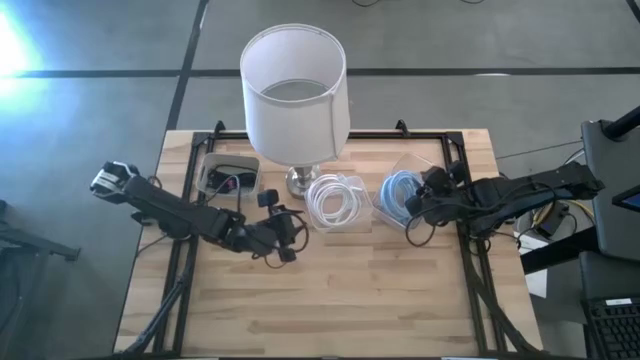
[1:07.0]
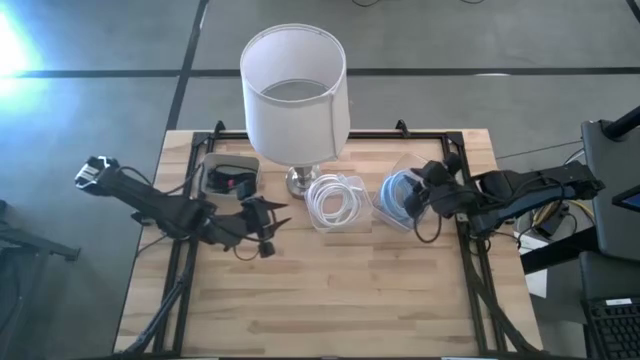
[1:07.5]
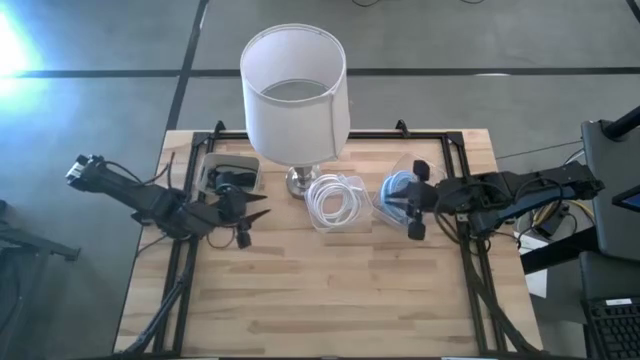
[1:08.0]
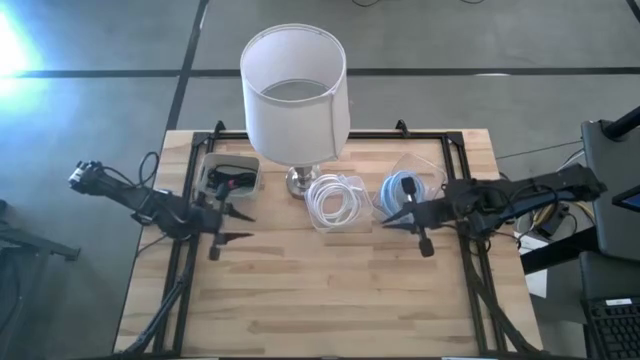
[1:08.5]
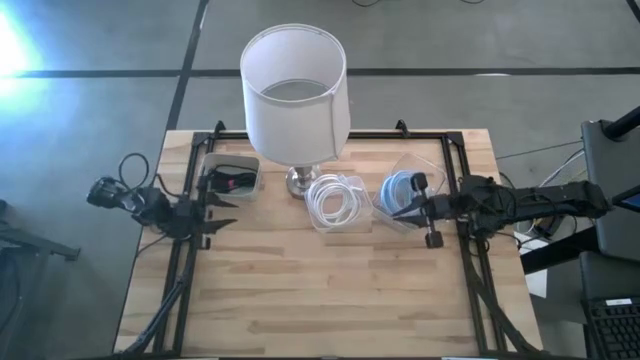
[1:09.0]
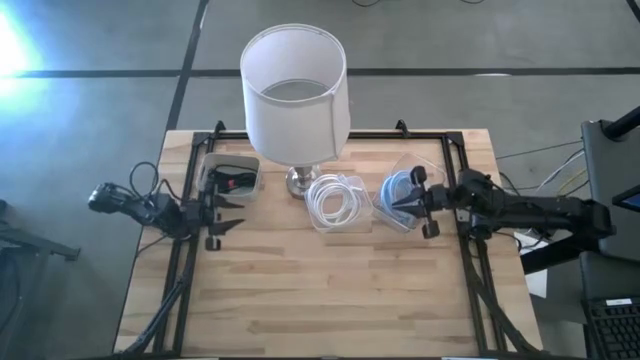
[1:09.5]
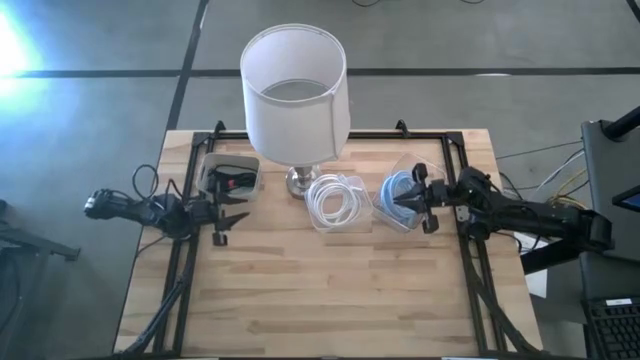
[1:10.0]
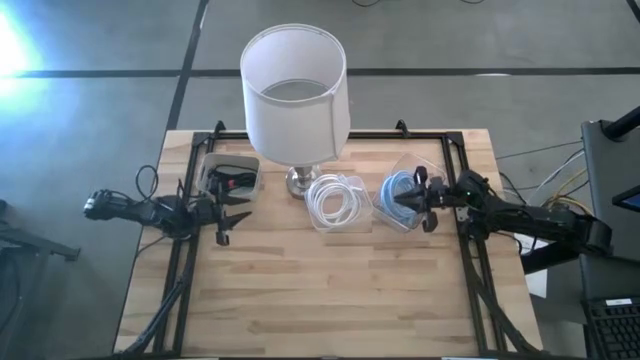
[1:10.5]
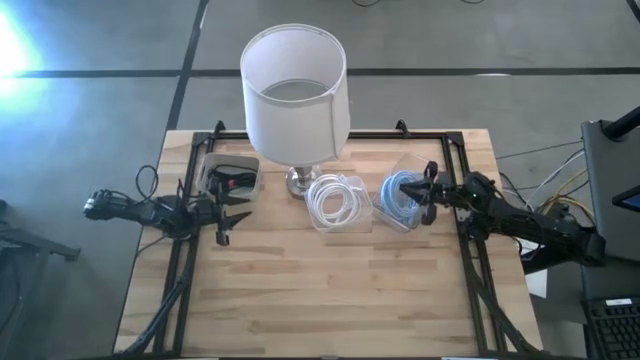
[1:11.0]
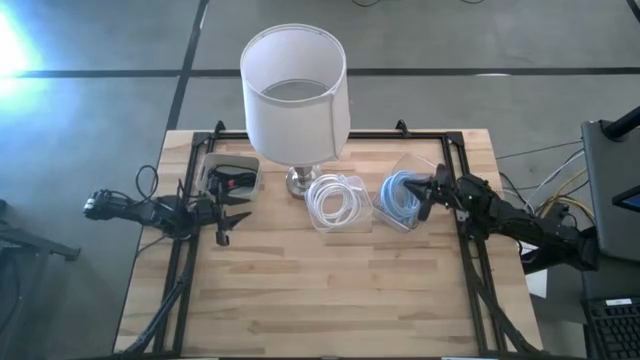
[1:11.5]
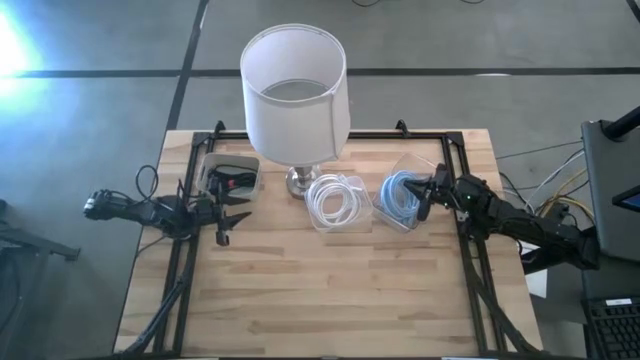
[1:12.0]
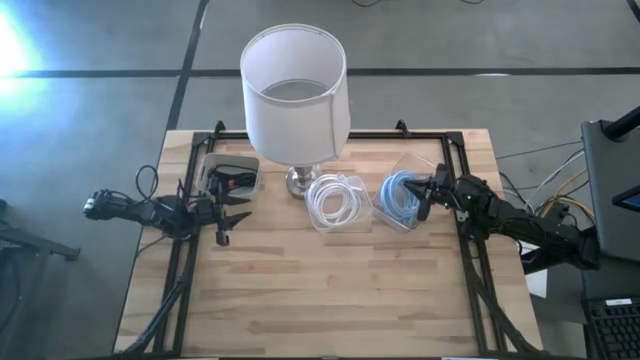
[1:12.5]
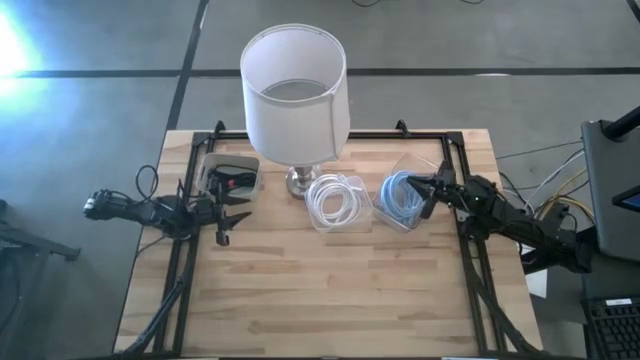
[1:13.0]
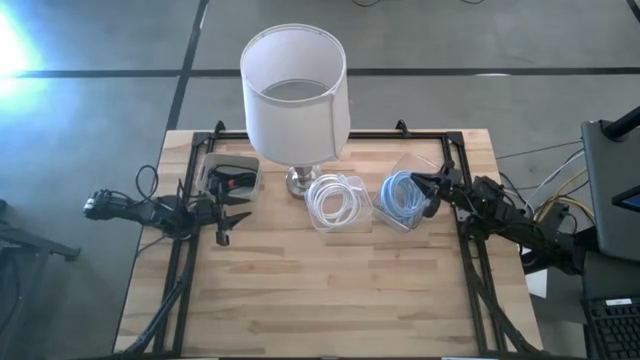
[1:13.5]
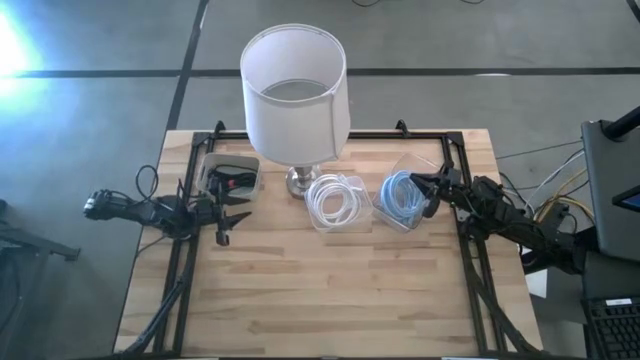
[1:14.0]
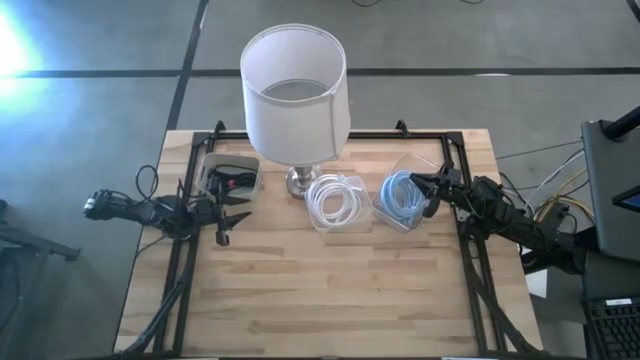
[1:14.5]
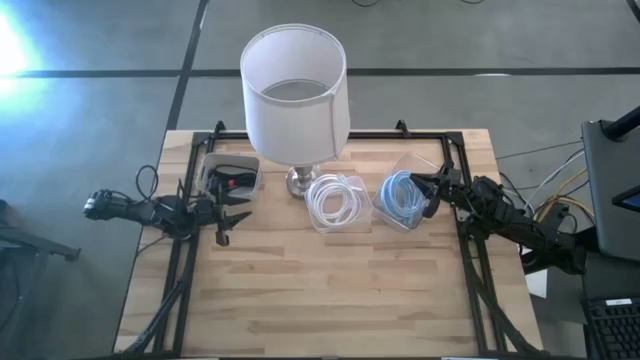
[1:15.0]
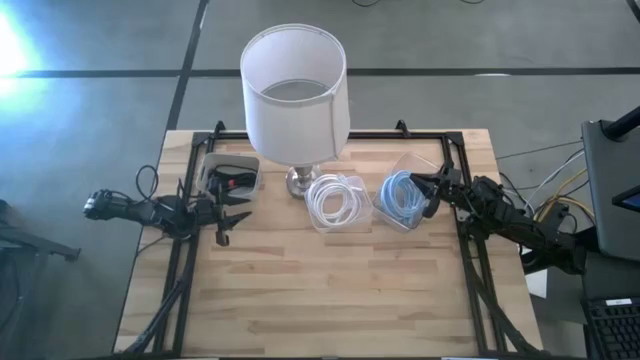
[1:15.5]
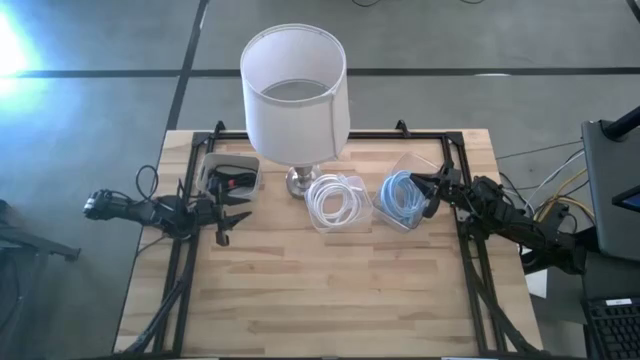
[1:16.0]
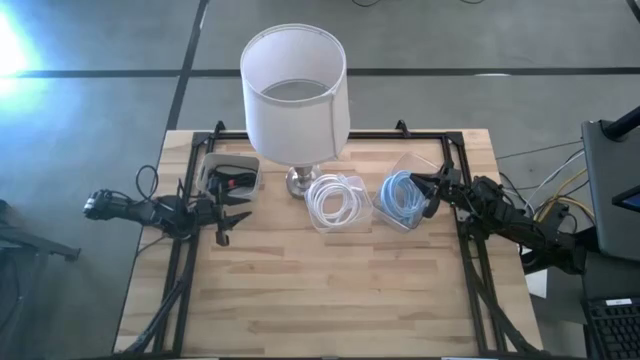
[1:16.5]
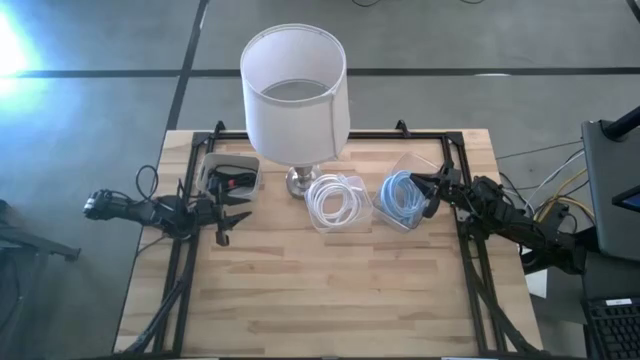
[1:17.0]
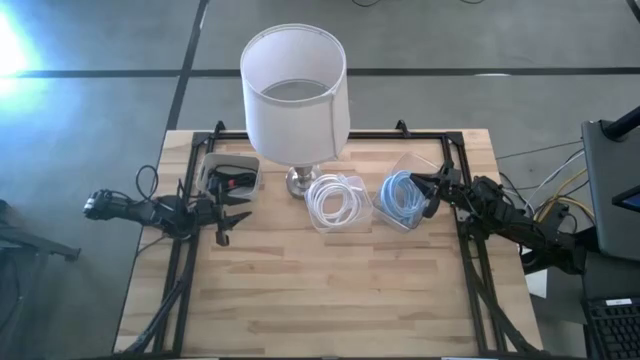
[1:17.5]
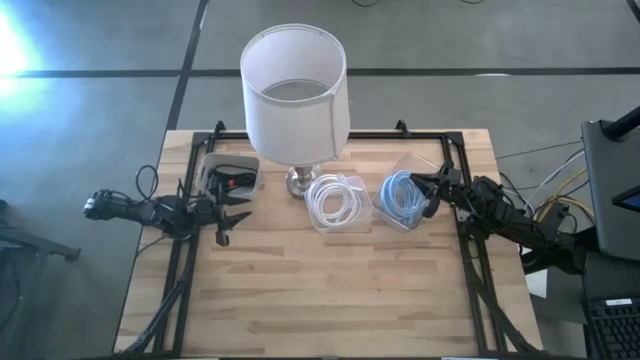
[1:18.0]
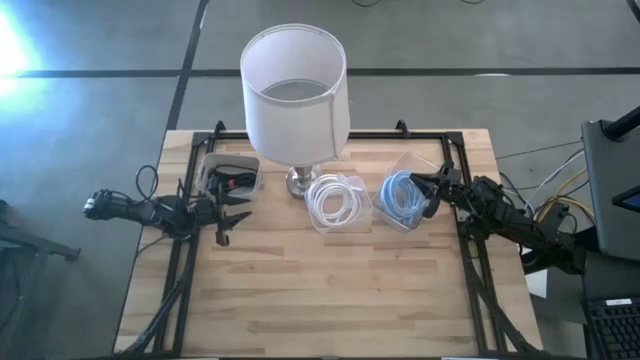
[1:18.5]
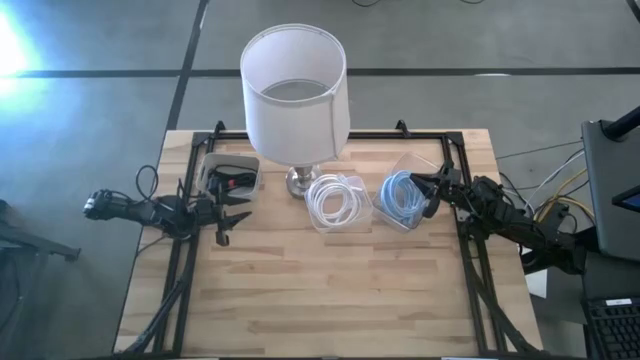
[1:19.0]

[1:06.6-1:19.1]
Task: Pick & Place USB Port
Return to Home Position

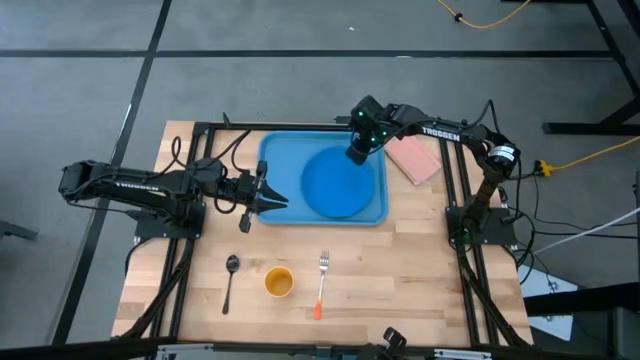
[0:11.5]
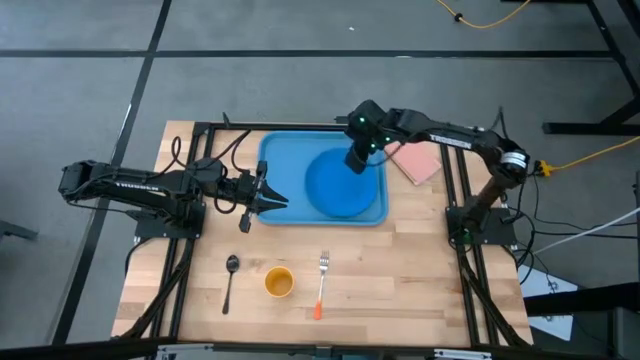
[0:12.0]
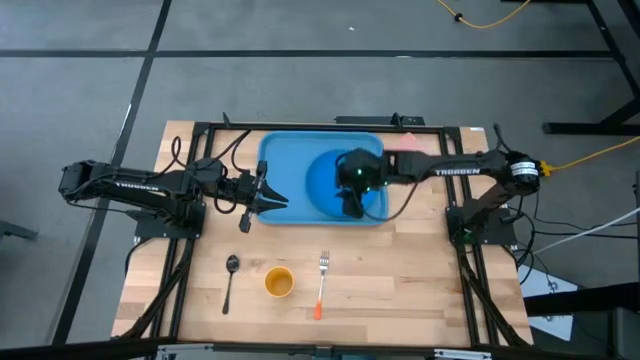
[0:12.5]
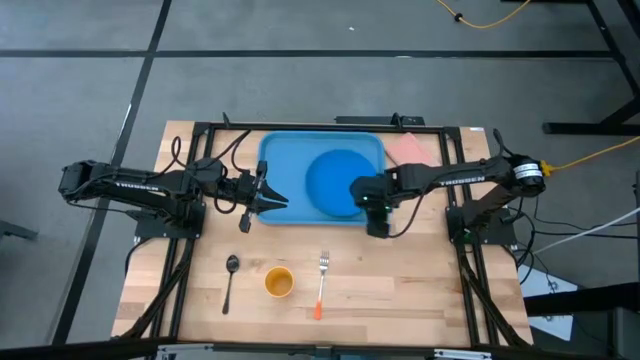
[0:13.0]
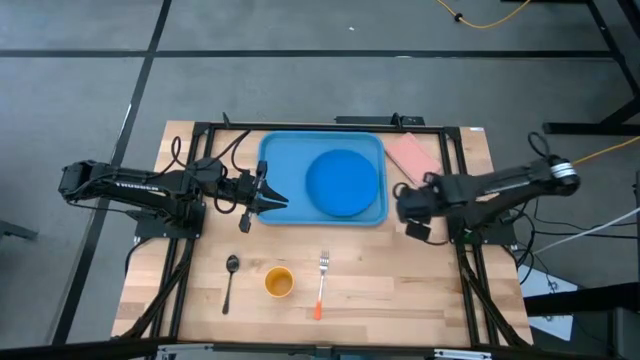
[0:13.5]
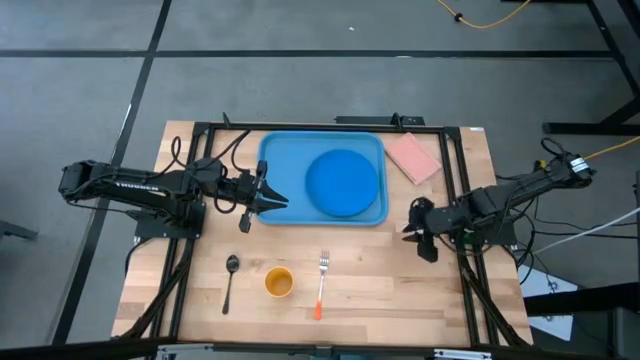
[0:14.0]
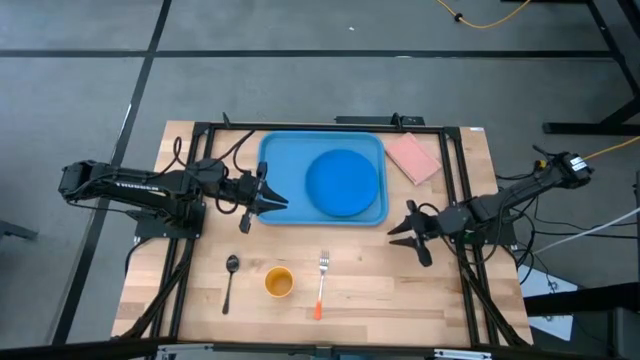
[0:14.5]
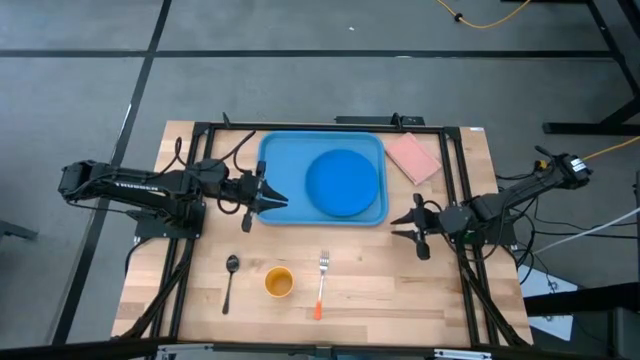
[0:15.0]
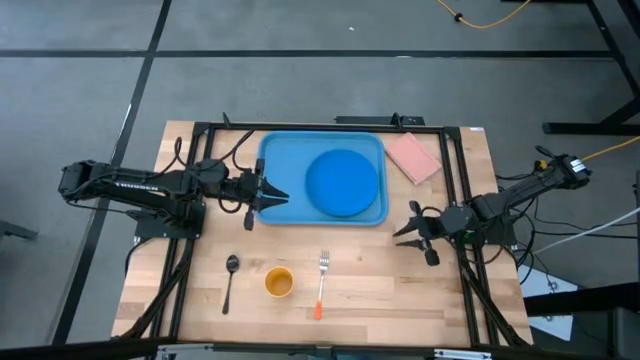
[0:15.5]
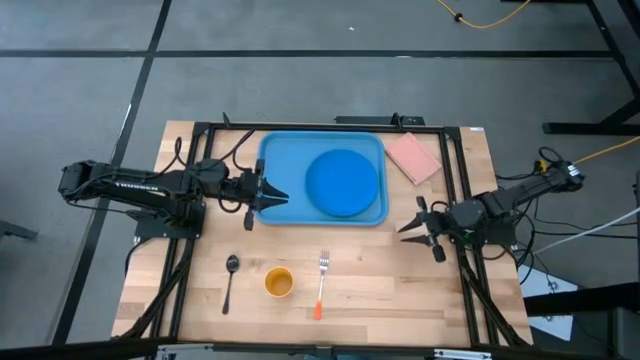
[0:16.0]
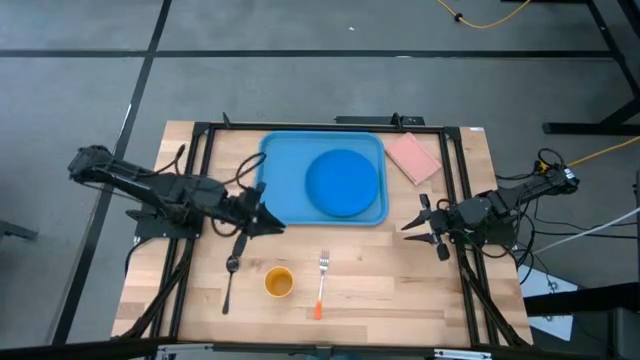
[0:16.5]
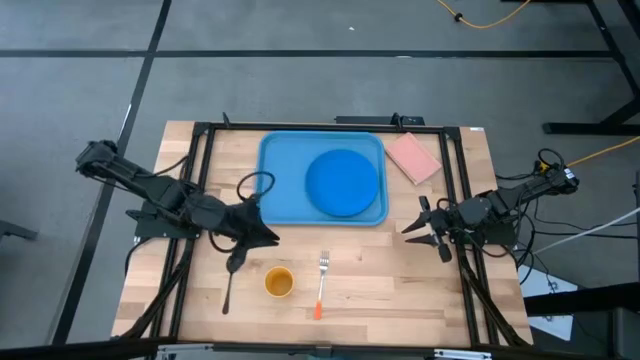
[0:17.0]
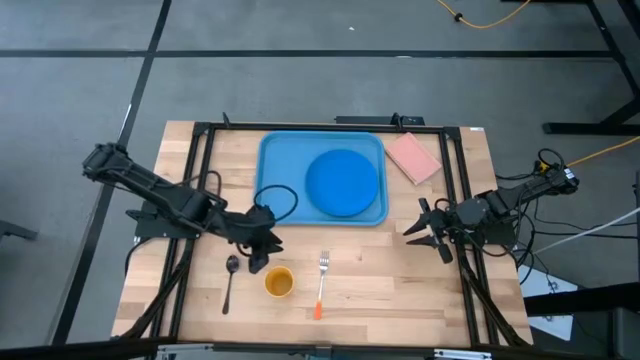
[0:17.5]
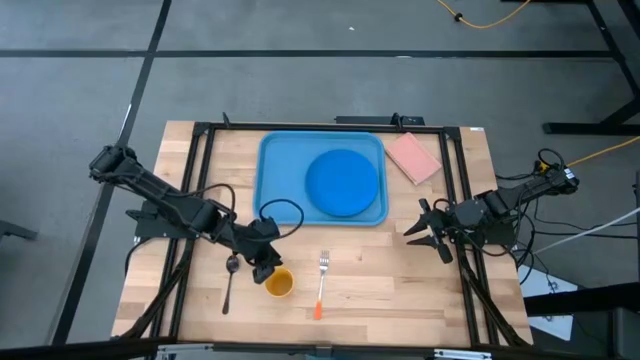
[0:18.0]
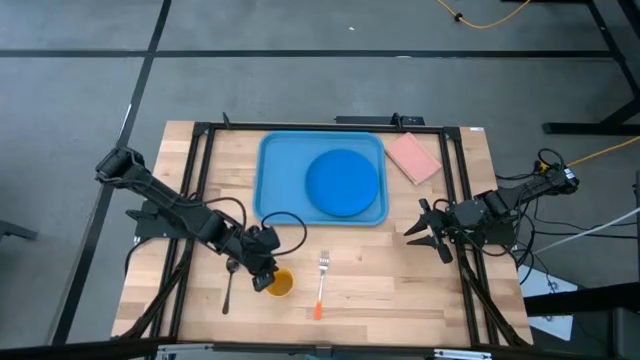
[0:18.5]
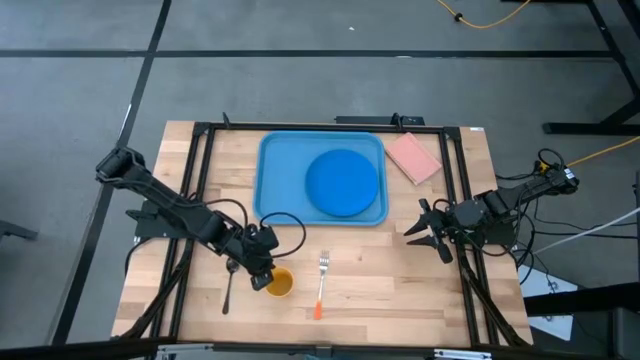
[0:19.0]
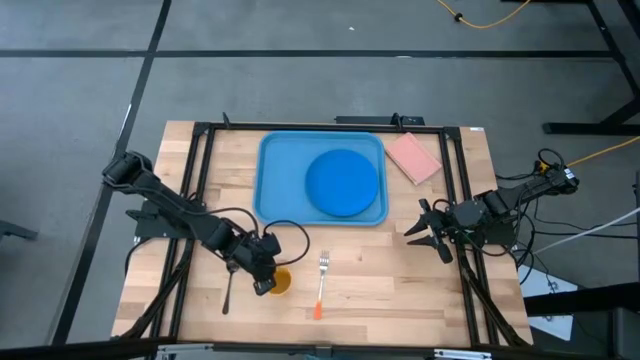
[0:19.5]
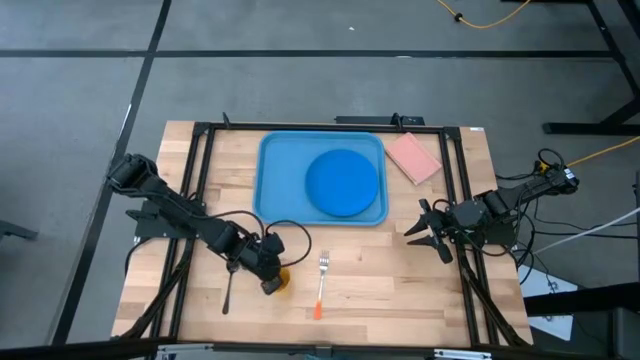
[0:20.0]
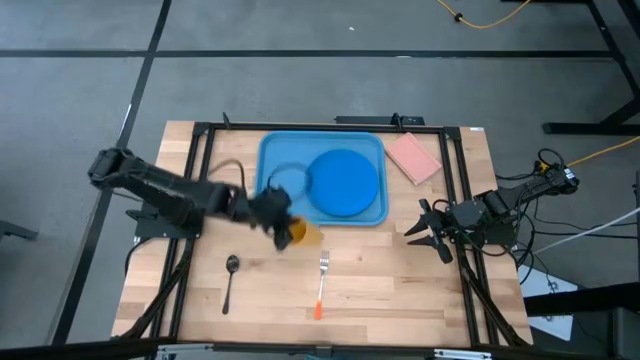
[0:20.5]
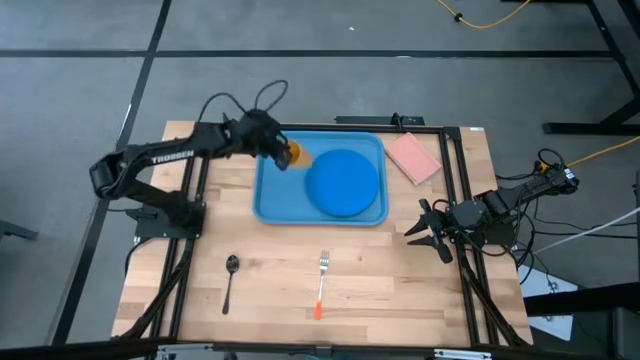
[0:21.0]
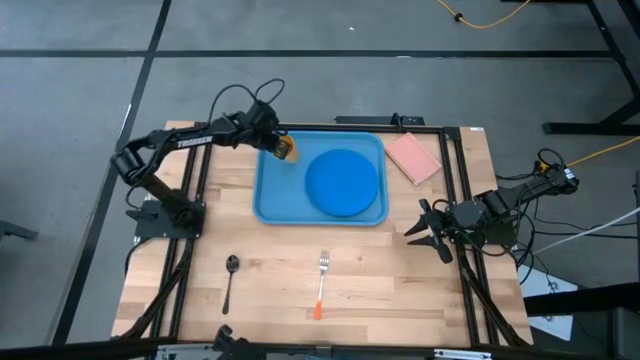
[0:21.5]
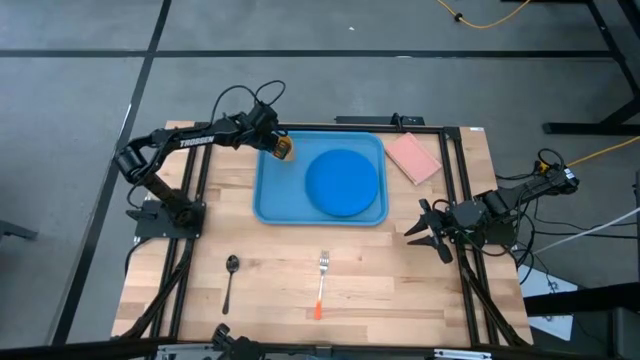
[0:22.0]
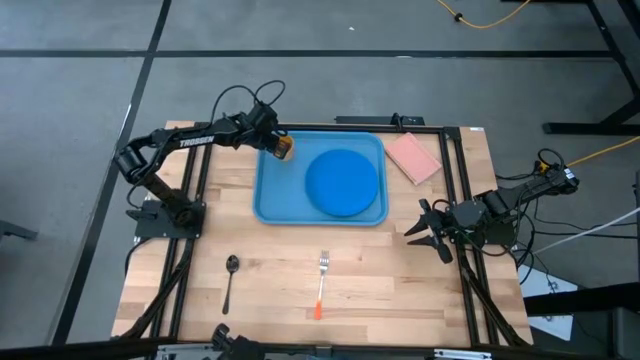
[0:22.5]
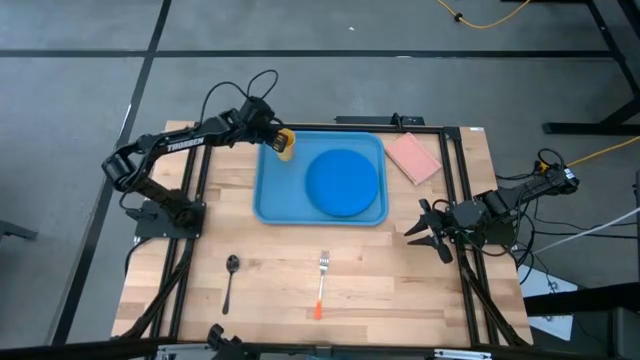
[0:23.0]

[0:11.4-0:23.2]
Task: Pick and place plate/cup/fork/spoon on tray
Put the yellow cup on the top left of the blue tray
